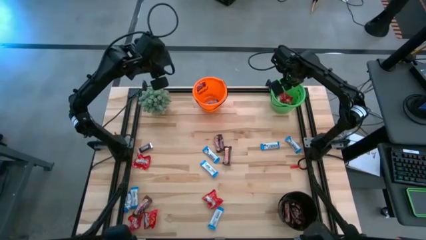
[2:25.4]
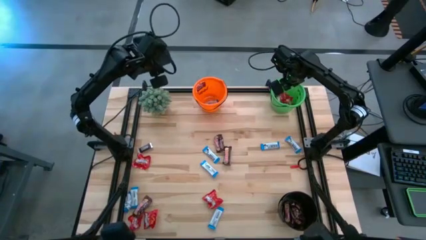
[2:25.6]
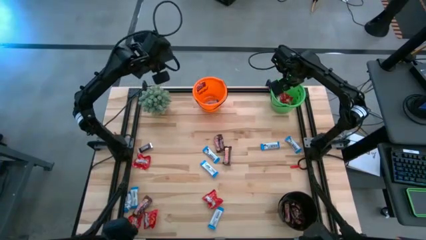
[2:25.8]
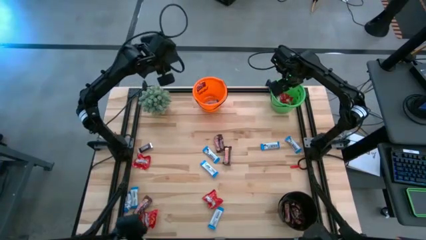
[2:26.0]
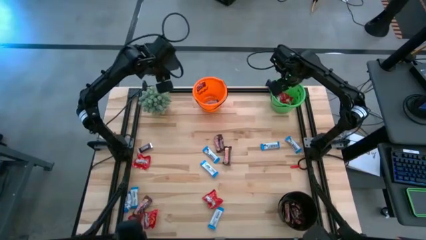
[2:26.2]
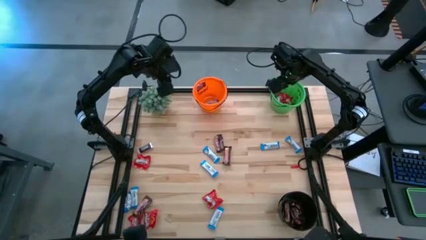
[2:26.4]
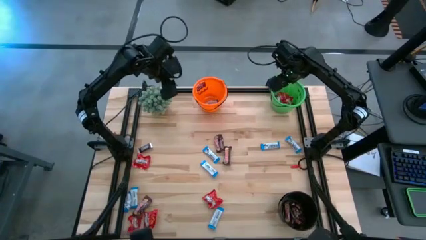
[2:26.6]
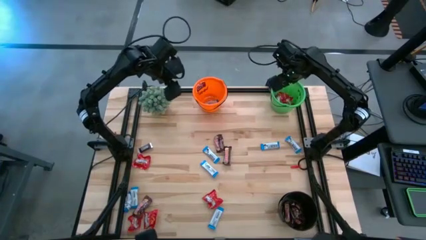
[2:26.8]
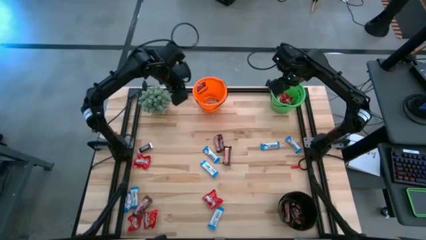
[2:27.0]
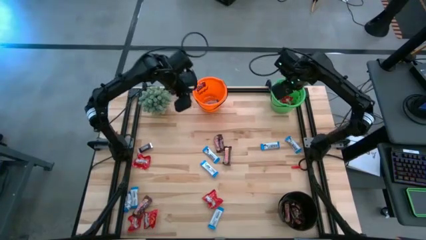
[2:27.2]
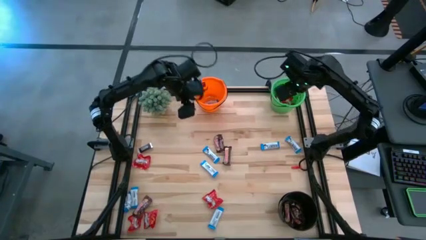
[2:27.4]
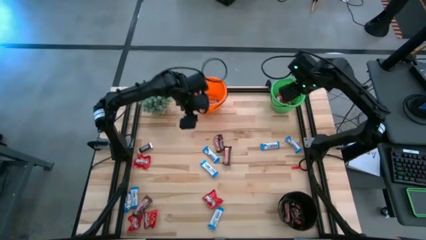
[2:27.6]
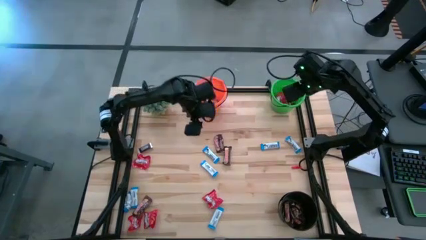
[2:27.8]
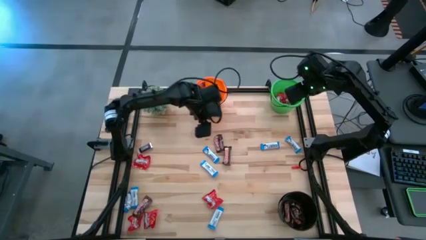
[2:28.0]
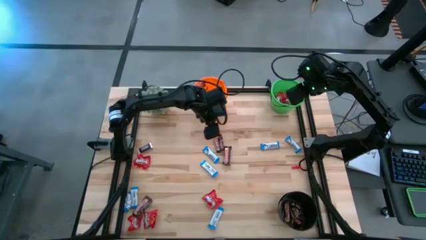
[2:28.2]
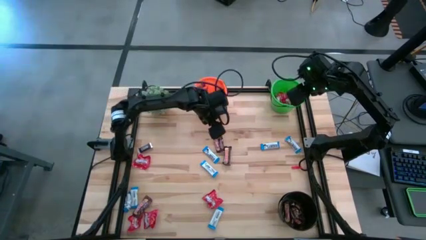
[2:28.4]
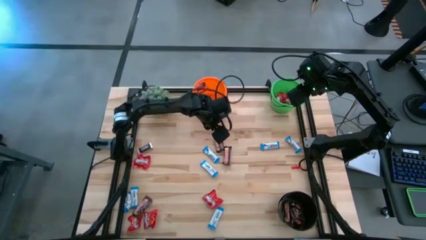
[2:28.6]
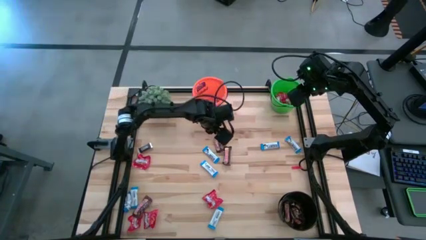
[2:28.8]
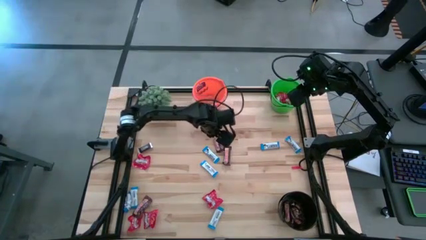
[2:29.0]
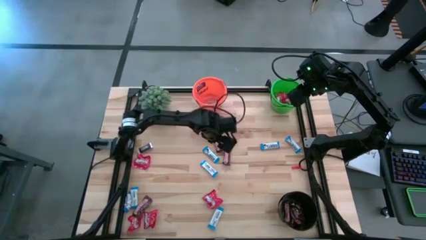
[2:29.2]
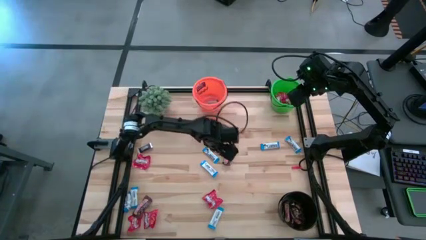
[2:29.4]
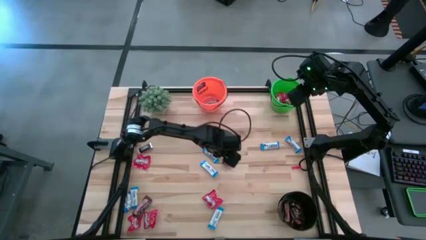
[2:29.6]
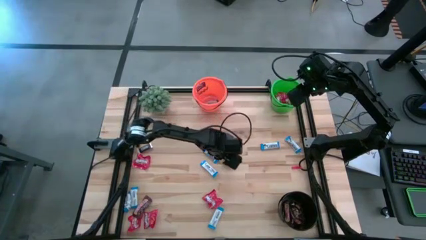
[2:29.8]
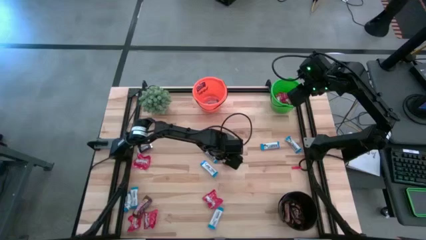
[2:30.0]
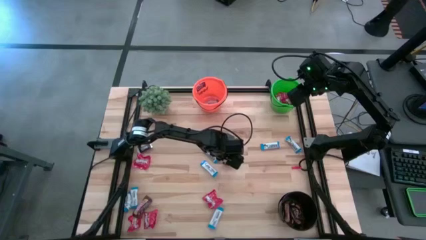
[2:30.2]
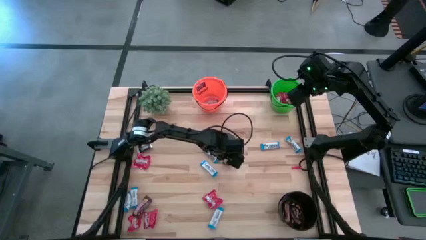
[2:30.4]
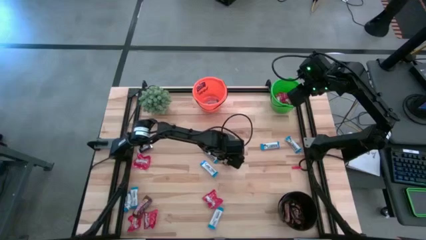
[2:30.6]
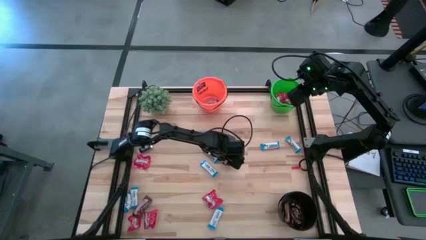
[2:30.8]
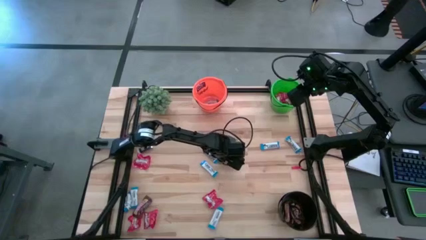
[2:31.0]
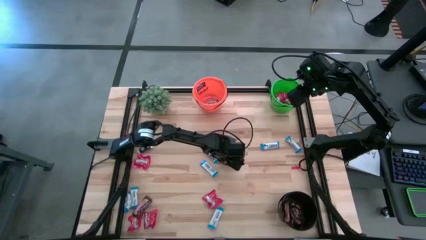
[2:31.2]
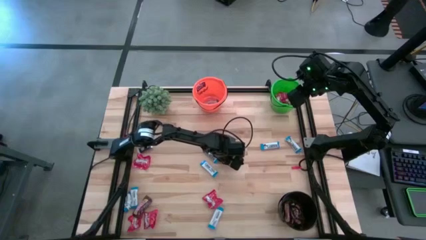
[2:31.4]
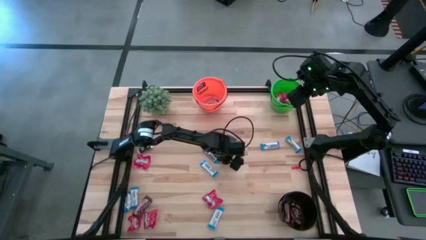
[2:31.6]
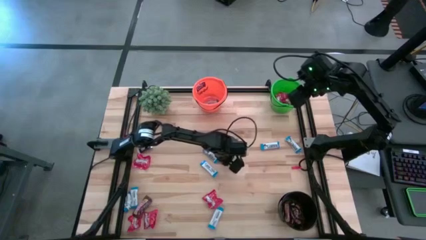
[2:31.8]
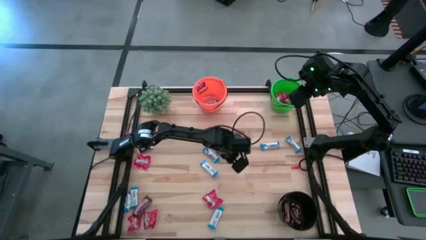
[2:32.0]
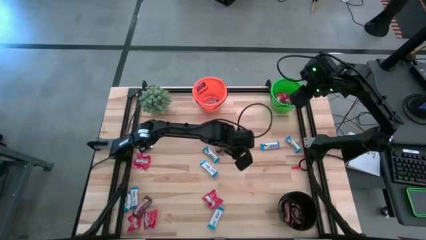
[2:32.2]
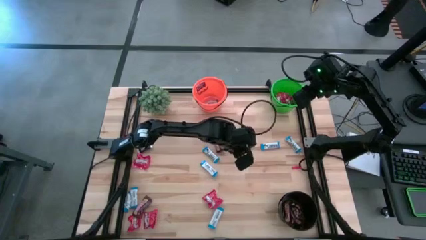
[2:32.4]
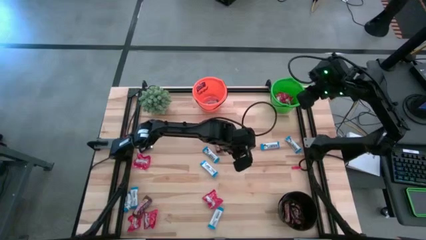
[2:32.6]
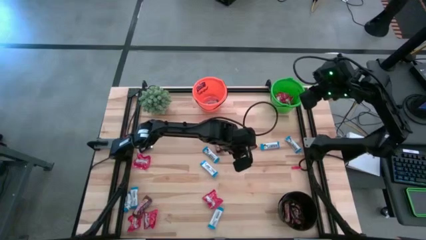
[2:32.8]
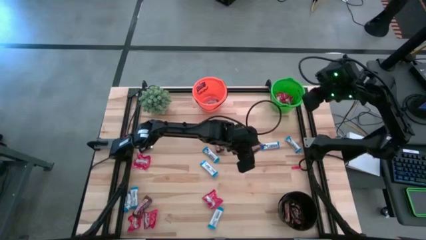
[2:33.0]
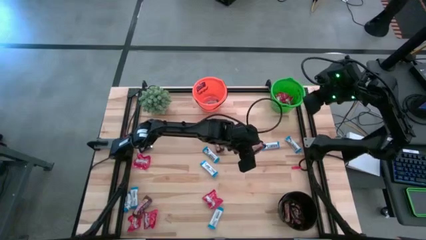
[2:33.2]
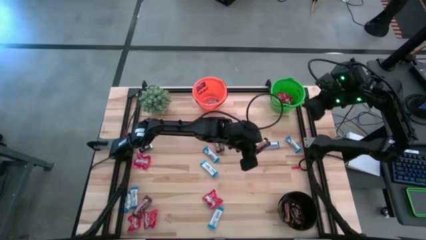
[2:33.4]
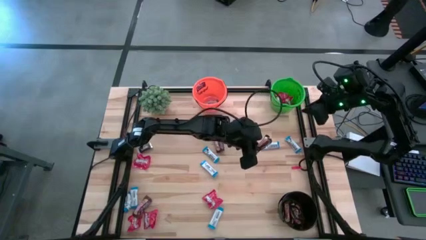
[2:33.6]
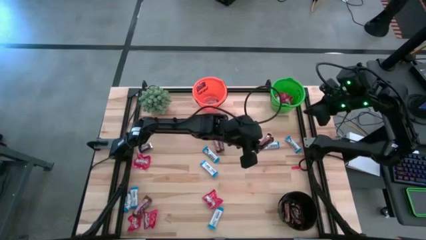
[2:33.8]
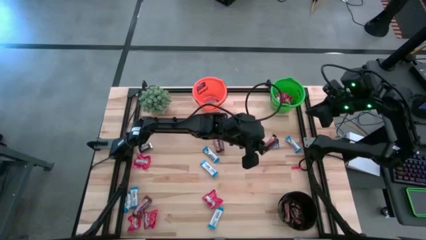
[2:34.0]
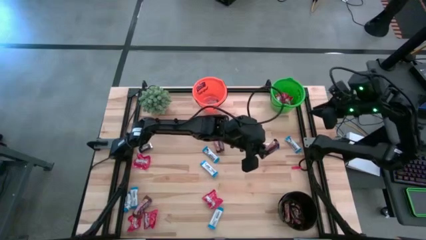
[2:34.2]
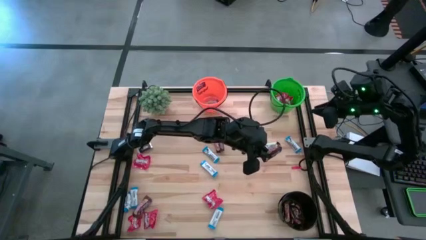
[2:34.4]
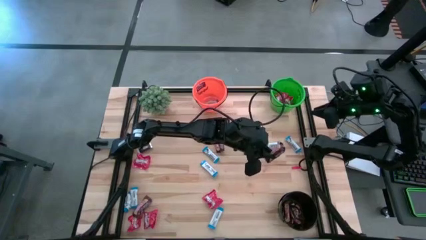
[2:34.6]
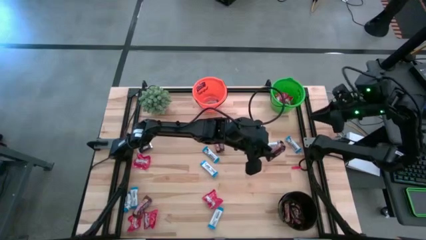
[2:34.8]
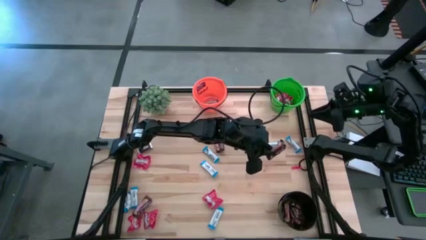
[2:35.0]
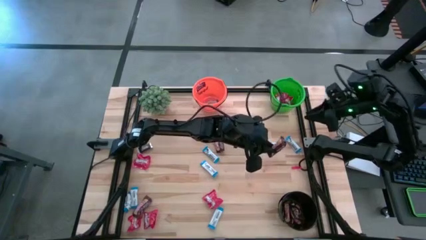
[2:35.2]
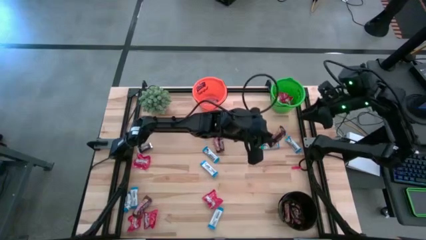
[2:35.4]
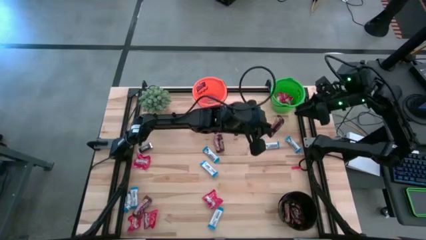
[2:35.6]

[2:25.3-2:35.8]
Task: Organize candy in baskets
Put the brown chocolate bar into the black bucket
